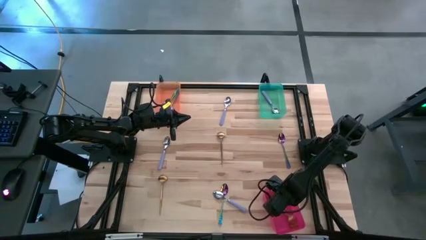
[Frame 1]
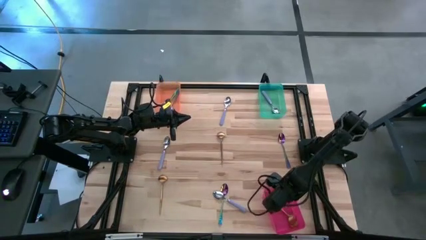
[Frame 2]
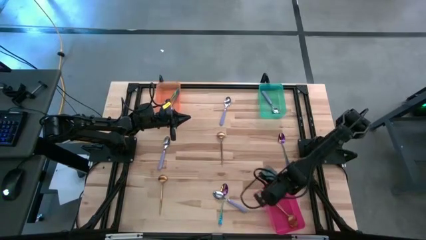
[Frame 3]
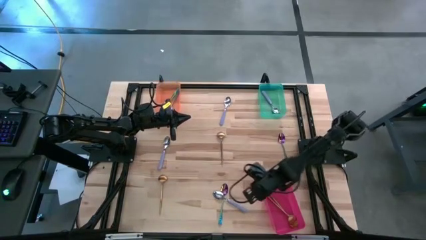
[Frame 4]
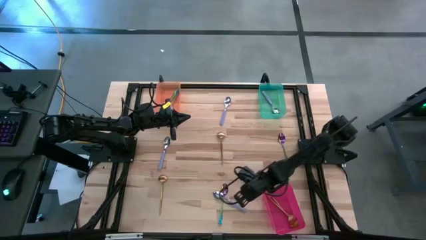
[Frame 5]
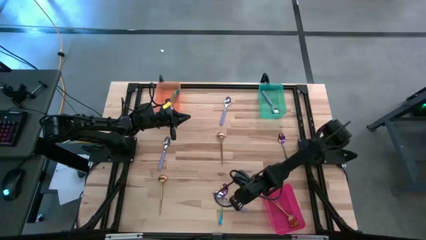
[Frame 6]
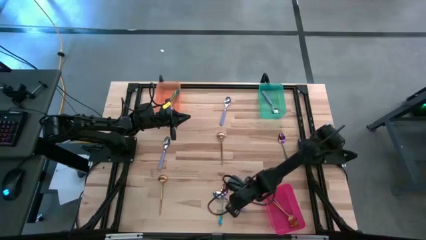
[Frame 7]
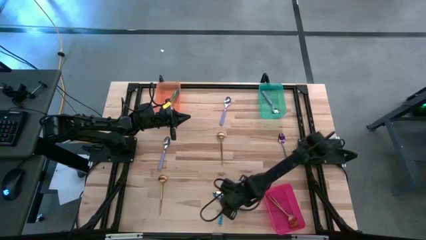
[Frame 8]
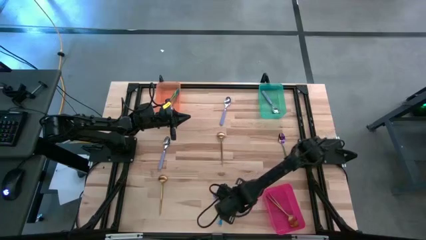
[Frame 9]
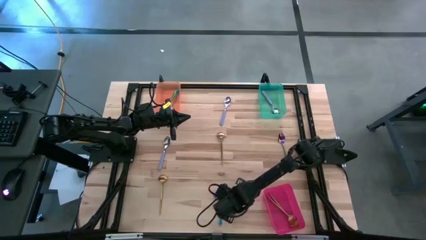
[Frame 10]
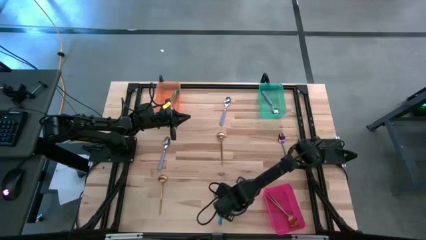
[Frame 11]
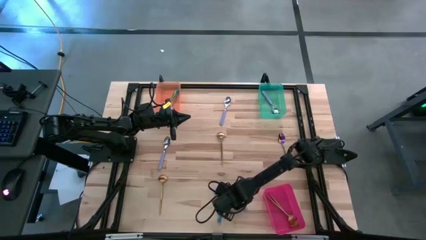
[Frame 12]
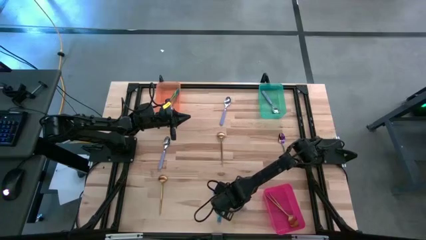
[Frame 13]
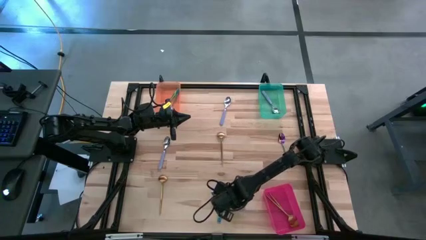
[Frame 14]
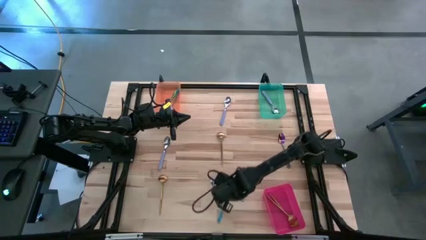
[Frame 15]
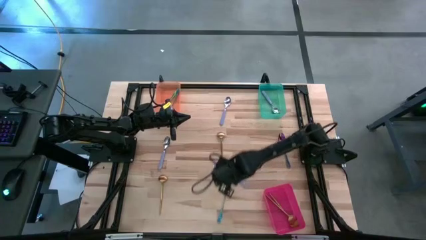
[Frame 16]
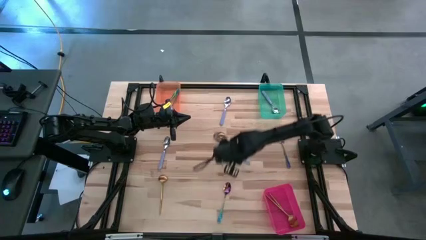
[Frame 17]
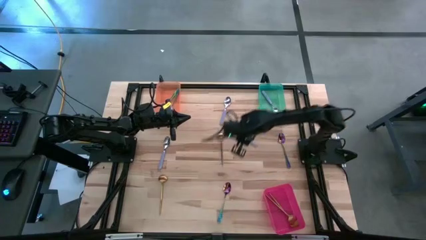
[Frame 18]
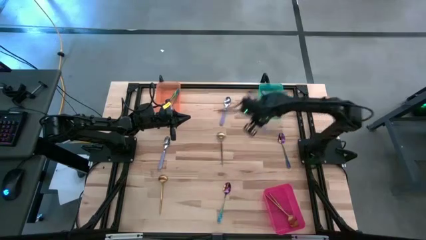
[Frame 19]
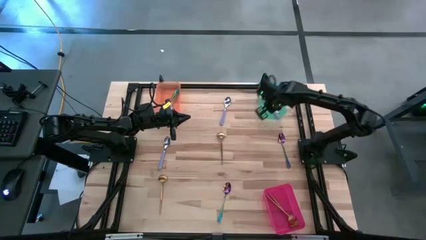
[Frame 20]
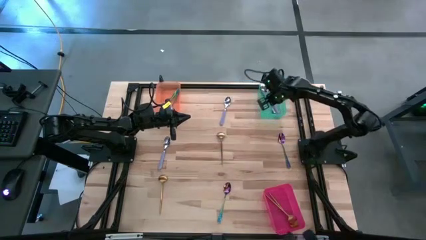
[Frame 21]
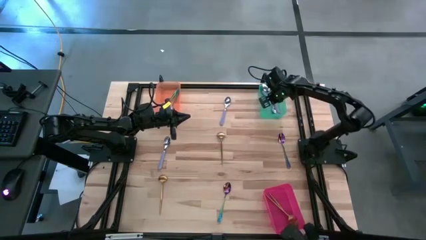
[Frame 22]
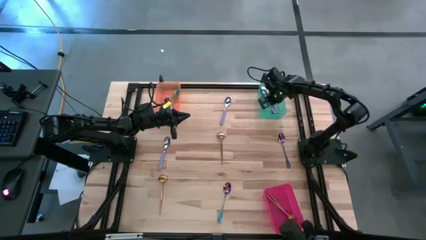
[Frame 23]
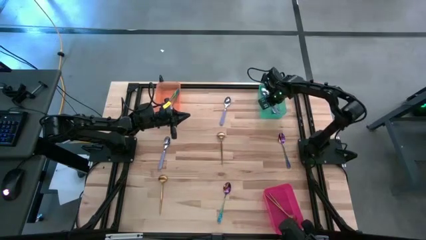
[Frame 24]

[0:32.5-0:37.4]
Task: Sort silverware by color (type)
Put the purple spoon into the green bin

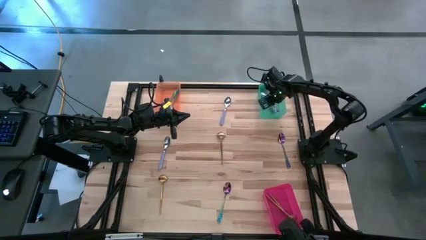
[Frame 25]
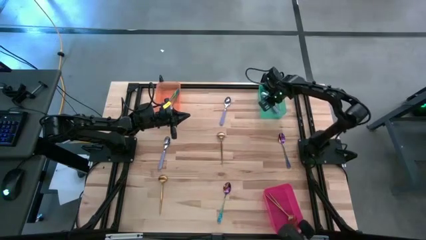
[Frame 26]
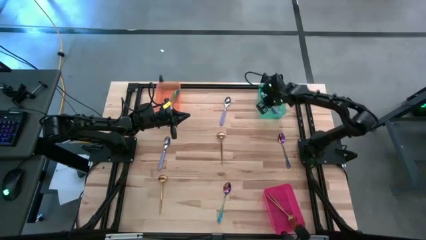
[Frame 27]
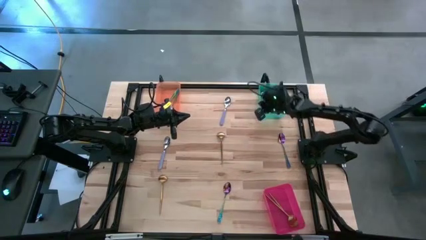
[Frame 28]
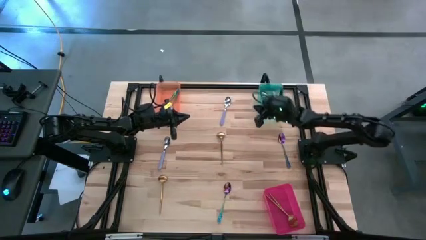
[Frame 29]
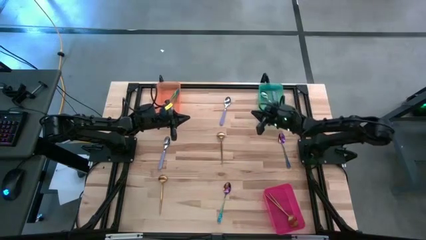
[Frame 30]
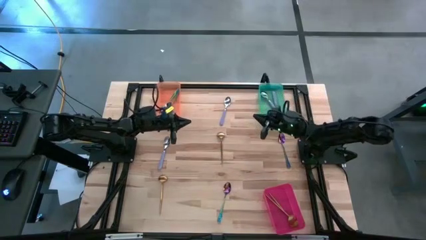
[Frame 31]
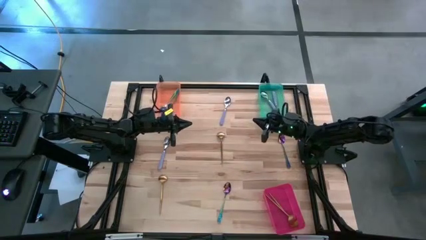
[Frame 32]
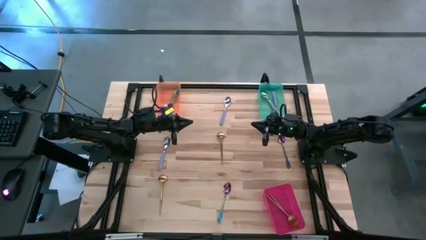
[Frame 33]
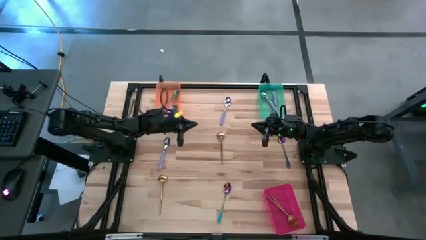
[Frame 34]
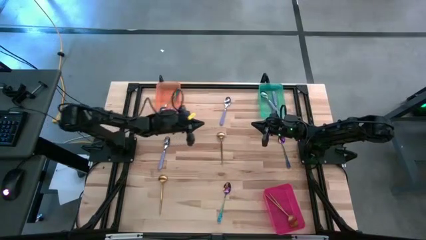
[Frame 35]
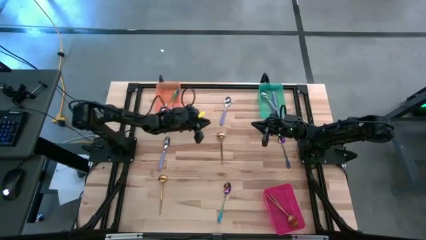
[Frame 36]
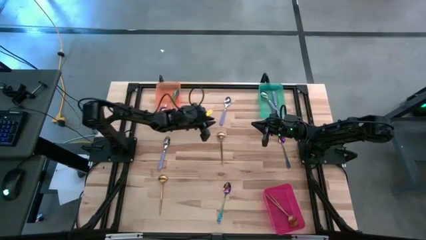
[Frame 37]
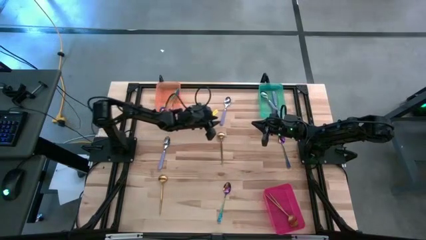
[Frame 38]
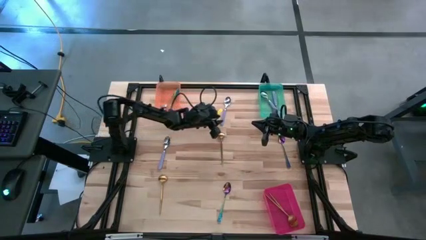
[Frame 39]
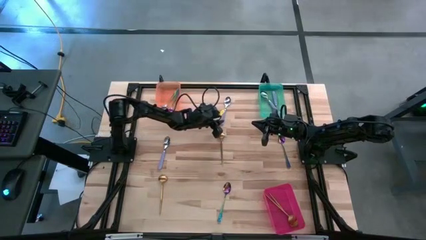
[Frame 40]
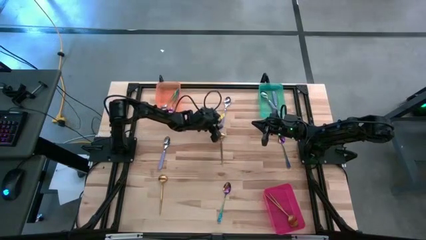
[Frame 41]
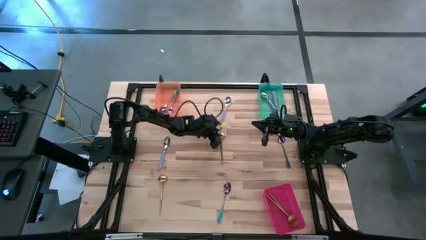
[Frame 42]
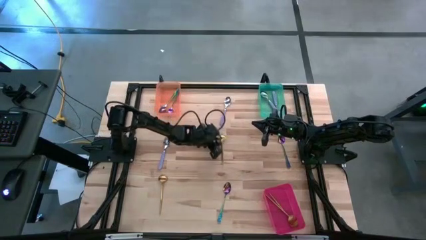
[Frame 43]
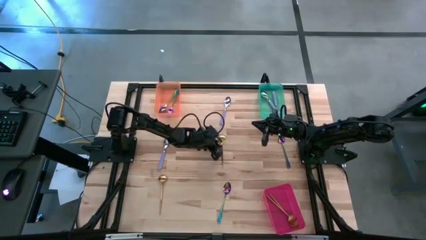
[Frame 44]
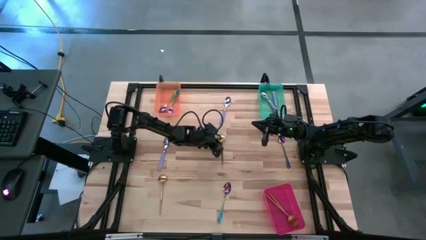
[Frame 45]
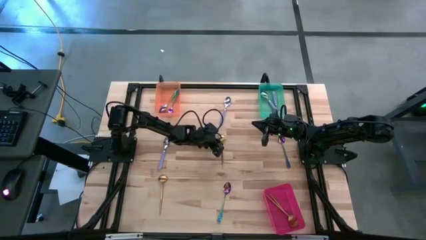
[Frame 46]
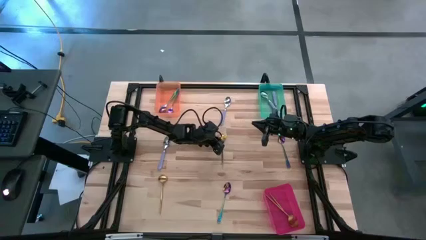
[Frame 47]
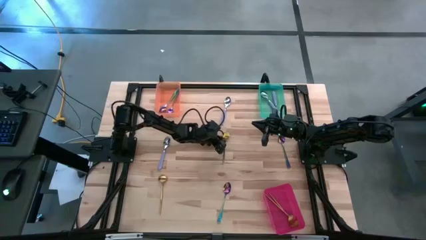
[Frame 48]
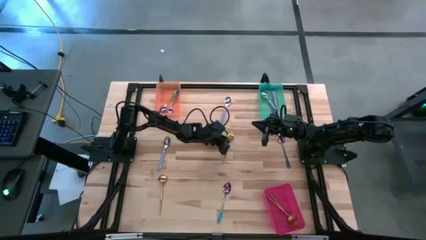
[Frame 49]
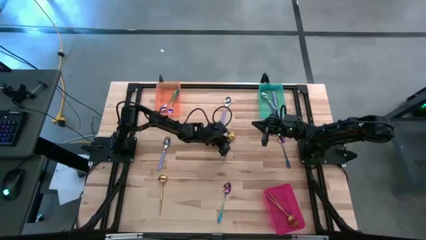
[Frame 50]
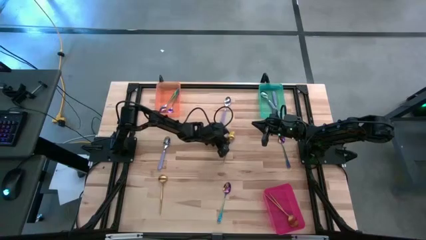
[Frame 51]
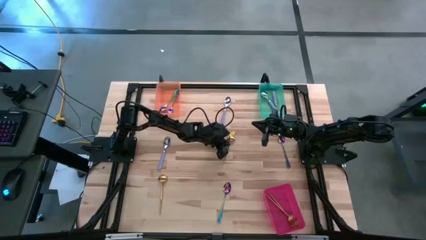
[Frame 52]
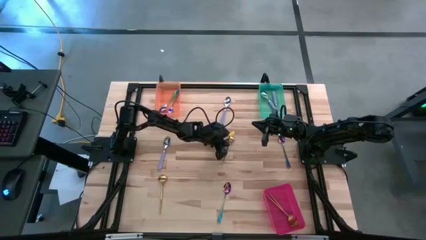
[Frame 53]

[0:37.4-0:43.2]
Put the gold spoon into the pink bin

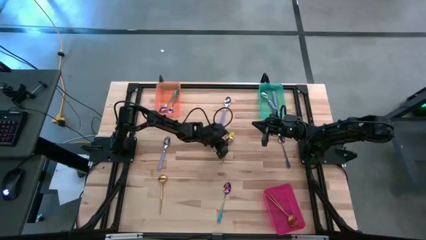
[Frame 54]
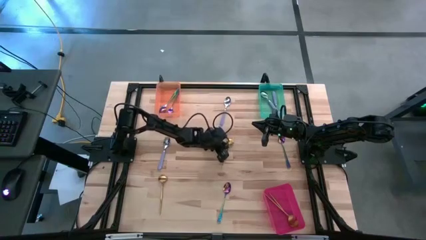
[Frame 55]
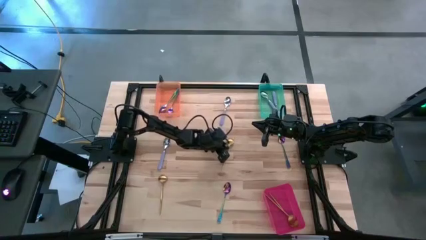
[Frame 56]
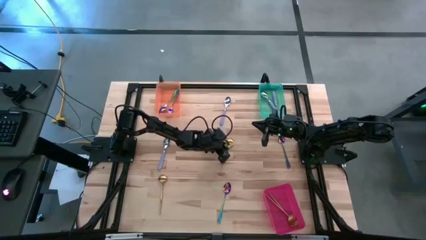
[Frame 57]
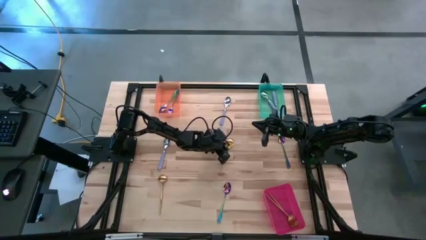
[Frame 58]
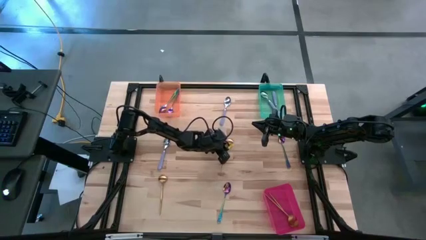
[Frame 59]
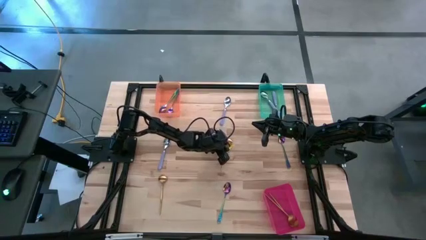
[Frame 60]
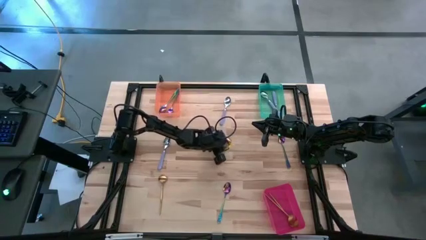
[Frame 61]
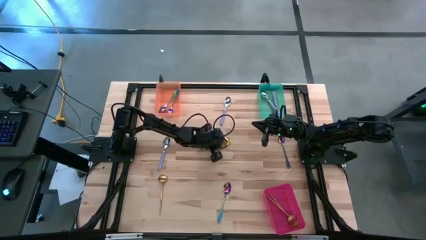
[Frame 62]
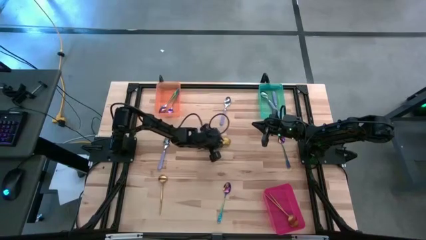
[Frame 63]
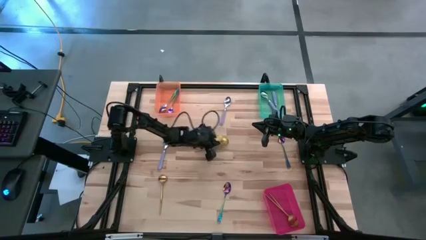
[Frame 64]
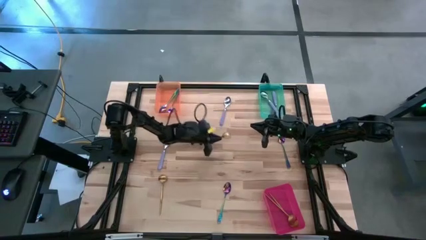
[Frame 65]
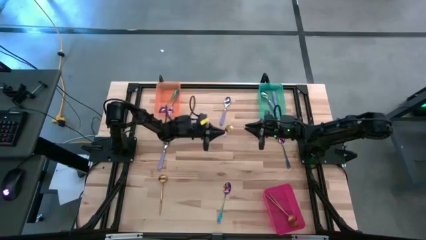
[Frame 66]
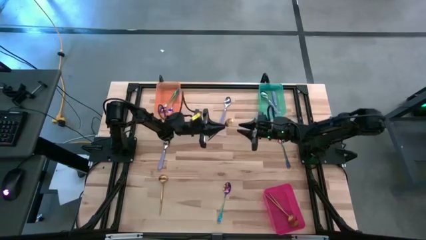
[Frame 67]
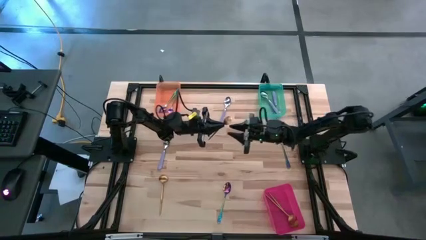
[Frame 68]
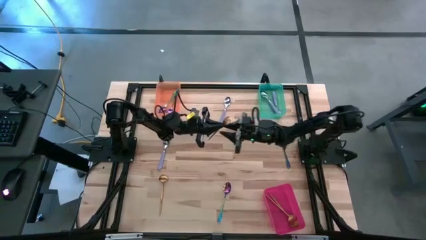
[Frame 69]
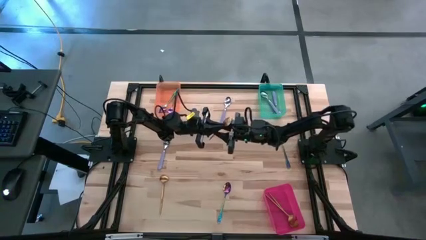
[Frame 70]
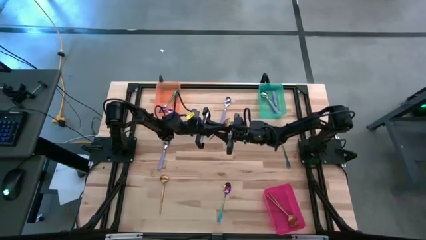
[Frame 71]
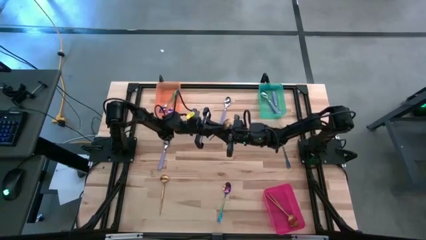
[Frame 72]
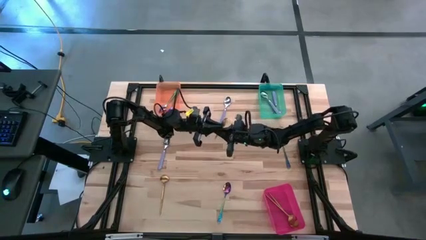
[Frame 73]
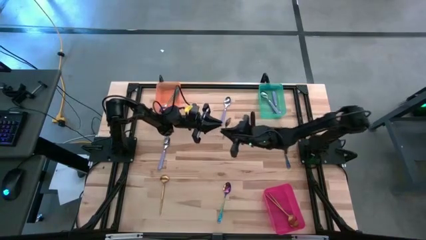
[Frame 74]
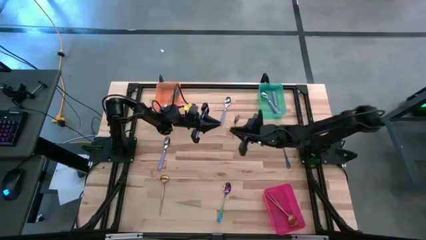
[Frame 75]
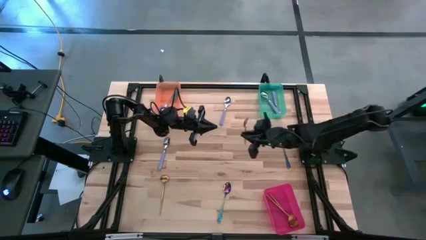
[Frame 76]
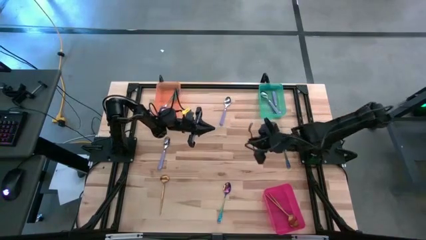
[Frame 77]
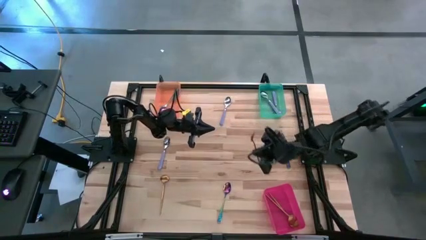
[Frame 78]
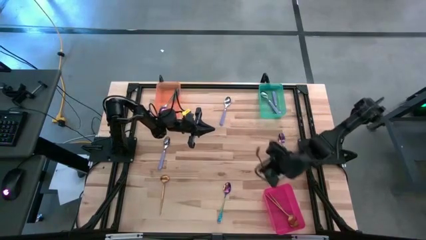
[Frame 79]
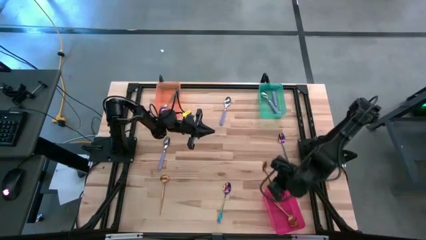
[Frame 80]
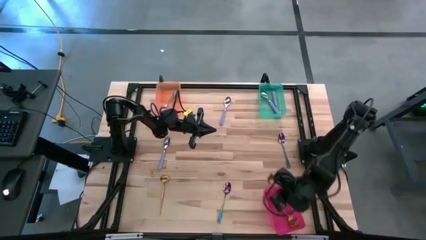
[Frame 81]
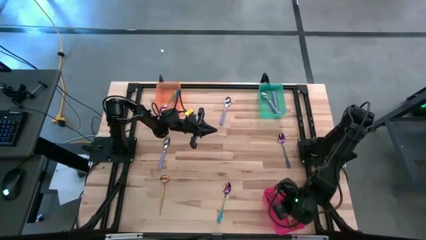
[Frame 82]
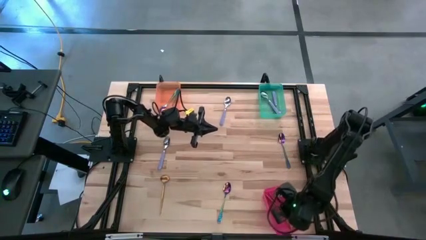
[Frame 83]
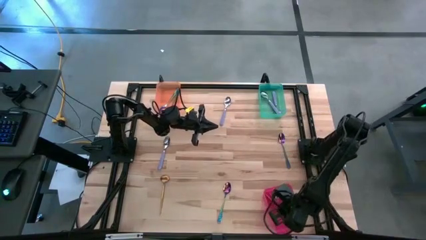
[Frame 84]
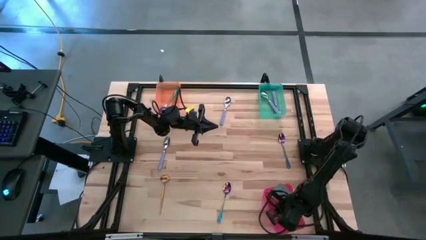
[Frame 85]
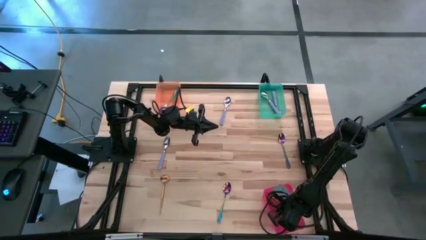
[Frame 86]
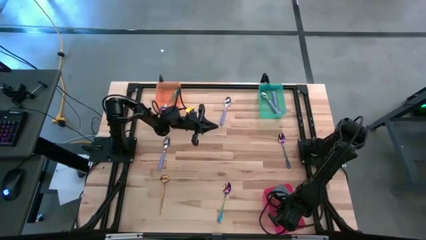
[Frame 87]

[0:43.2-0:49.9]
Put the gold spoon into the pink bin

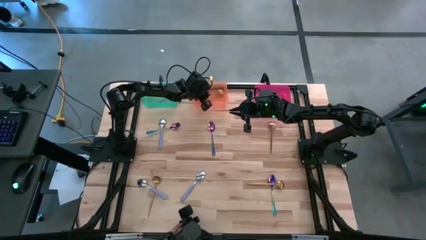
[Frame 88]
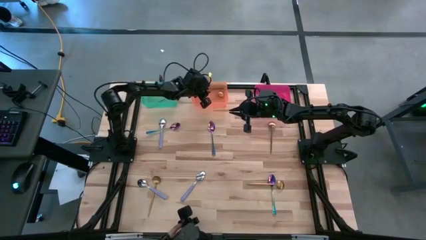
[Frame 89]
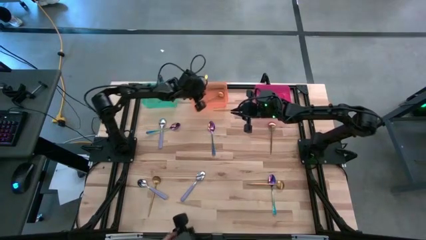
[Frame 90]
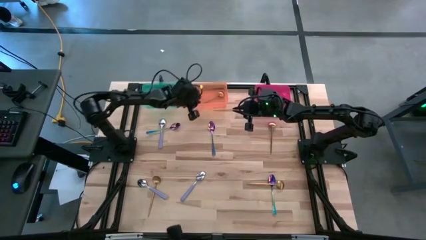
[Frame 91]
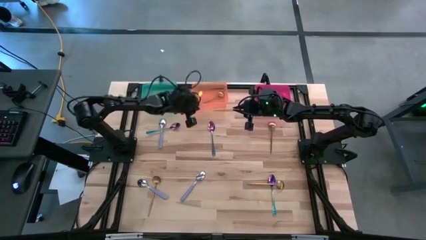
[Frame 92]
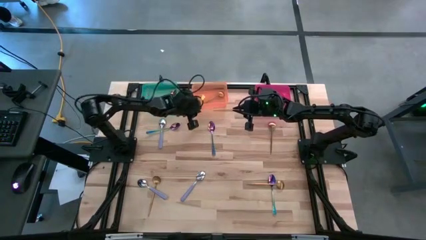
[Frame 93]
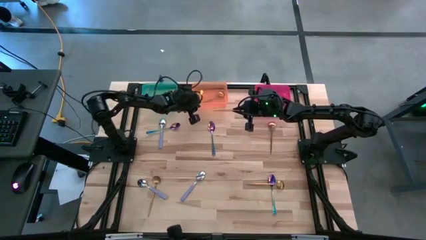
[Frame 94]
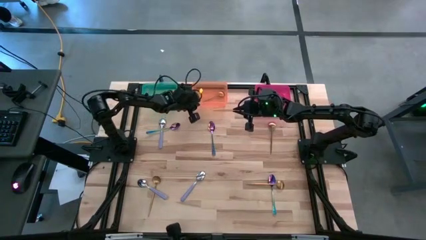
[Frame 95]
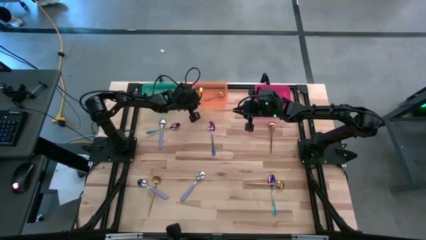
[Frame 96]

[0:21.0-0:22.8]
Task: Sort silverware by color (type)
Adjust the orange bin
